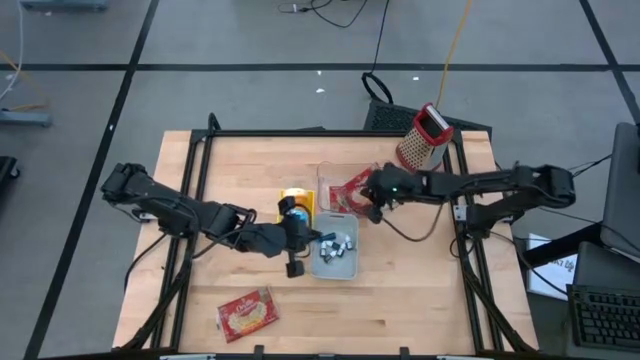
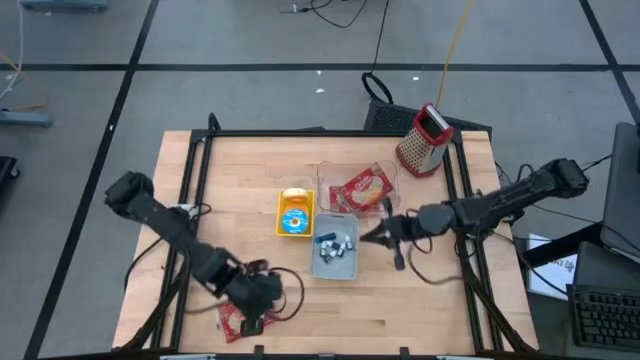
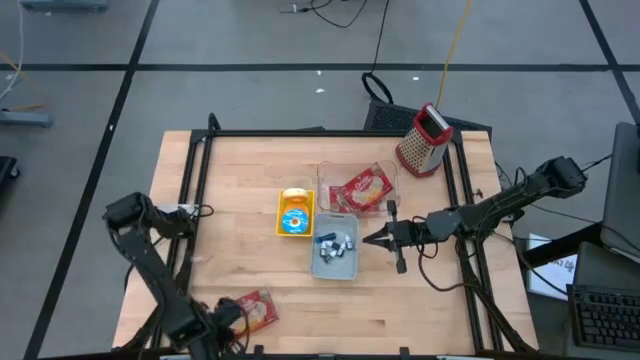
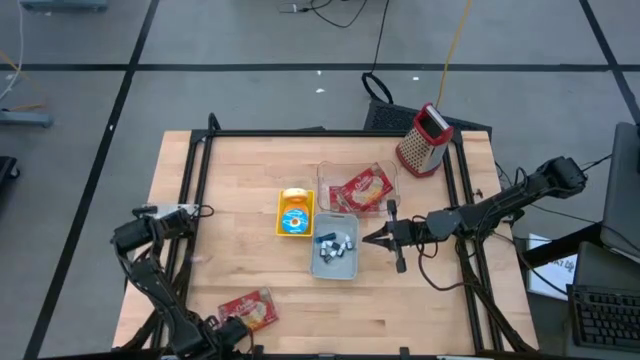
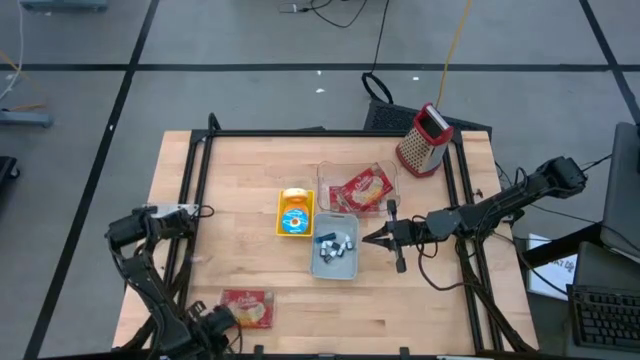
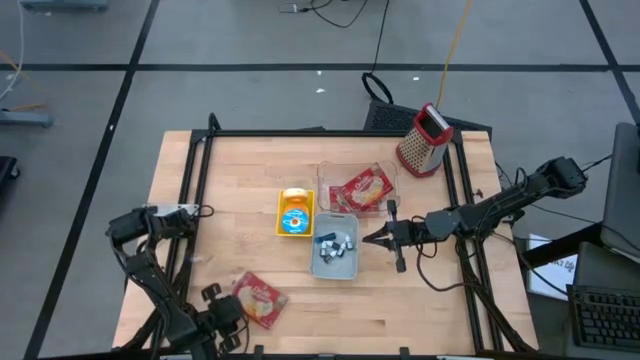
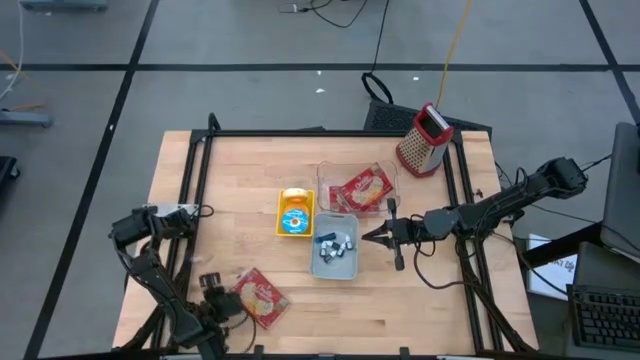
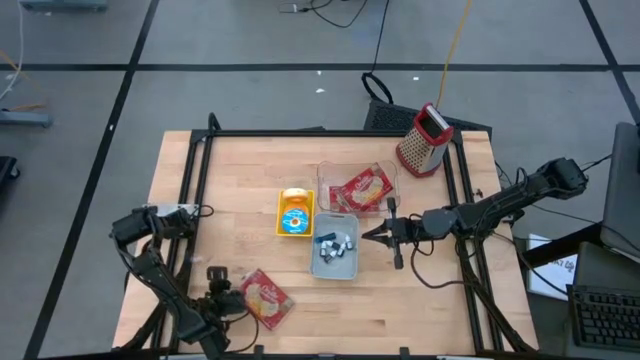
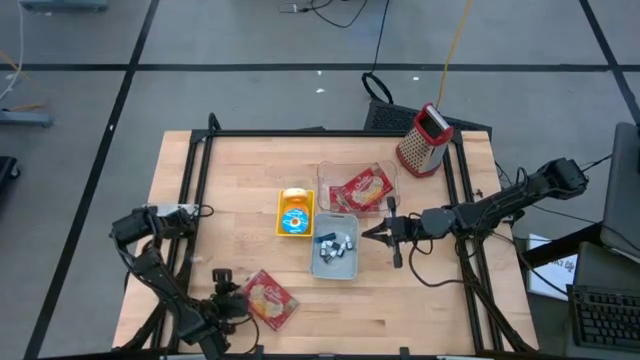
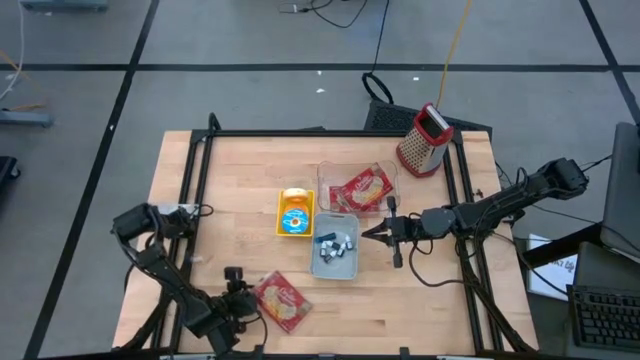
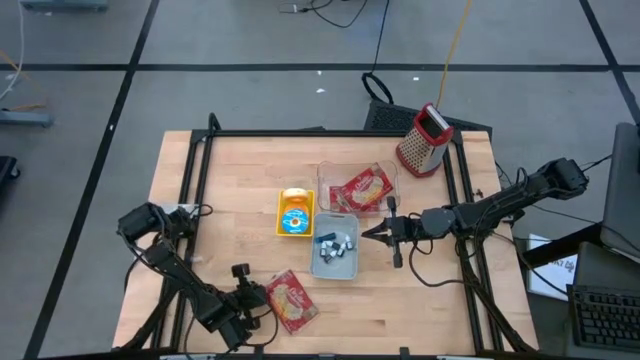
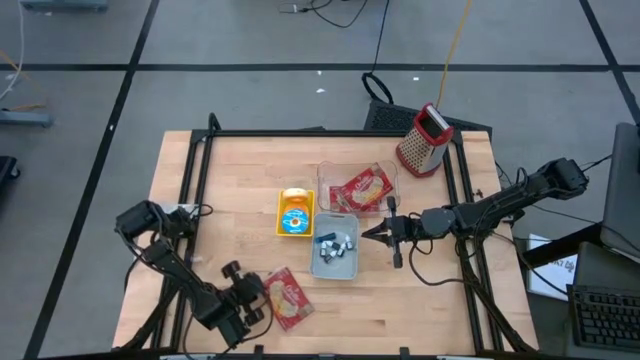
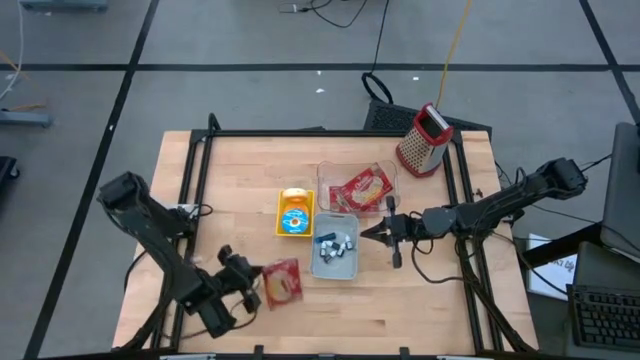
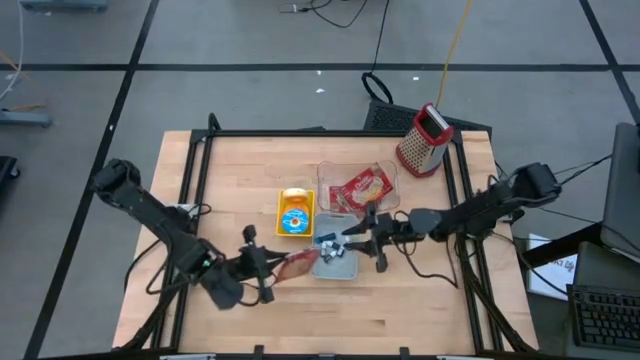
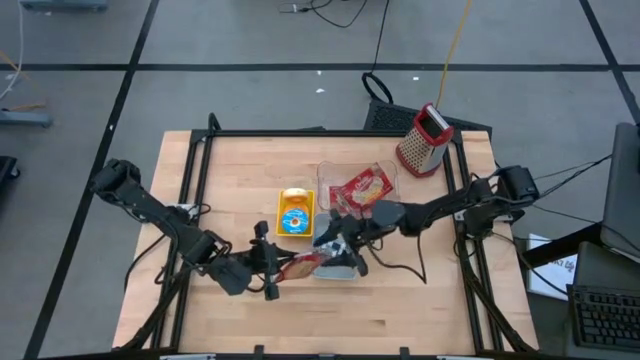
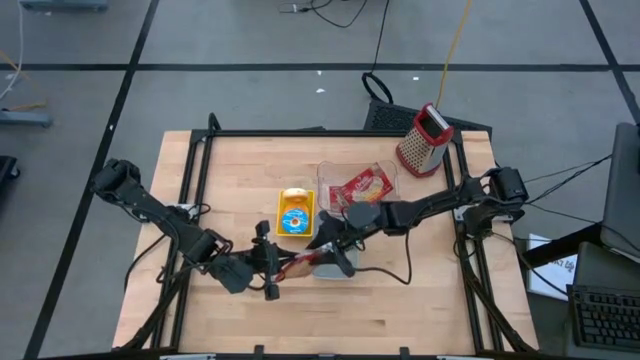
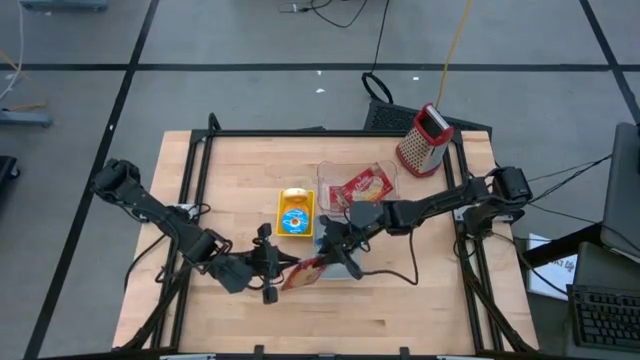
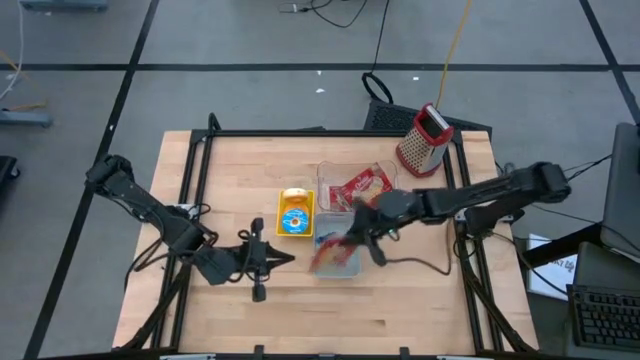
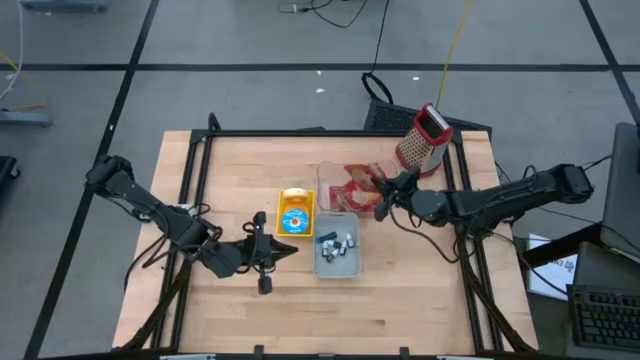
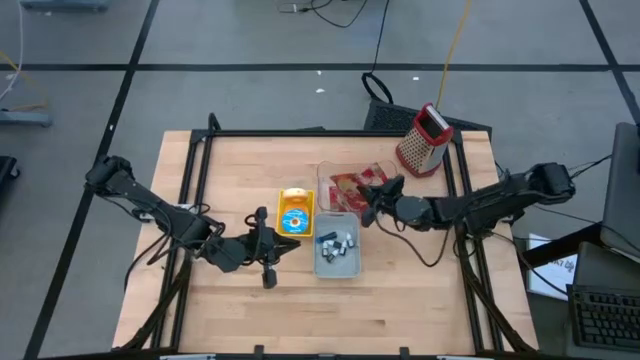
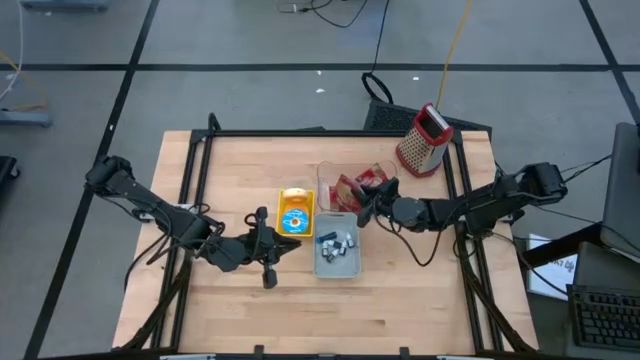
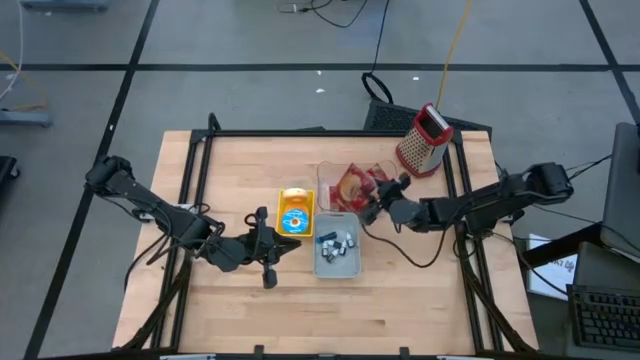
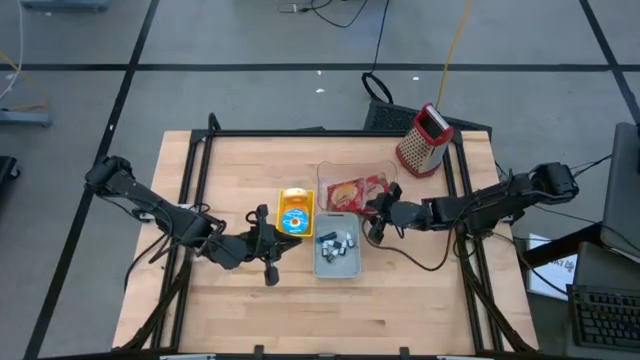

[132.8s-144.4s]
Put the red popcorn bag into the transparent bin

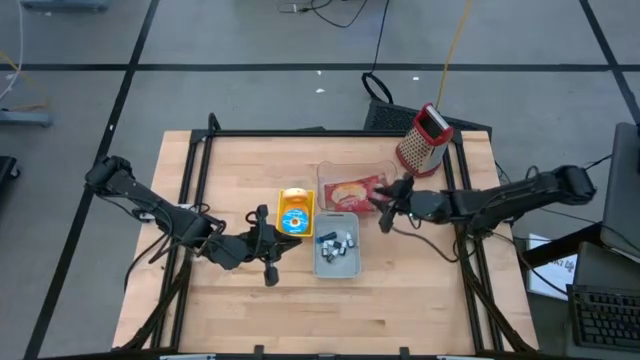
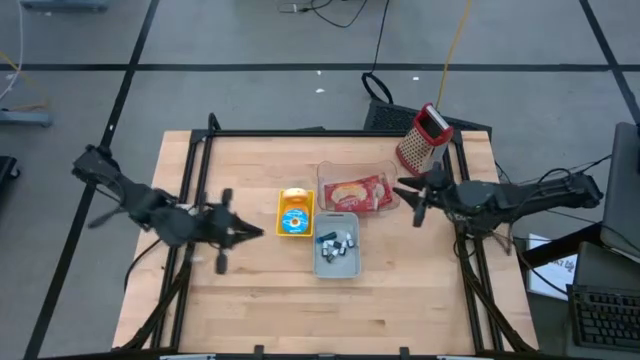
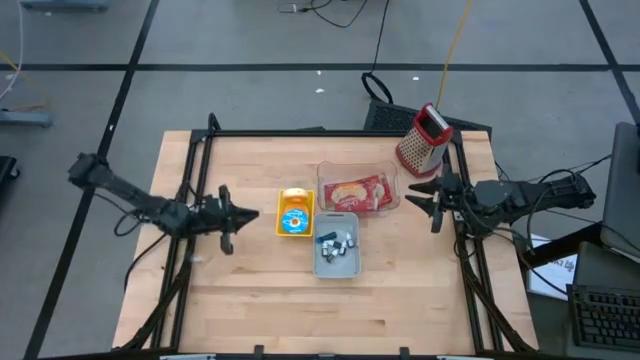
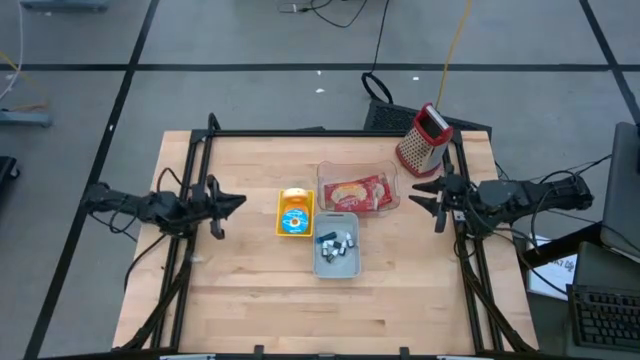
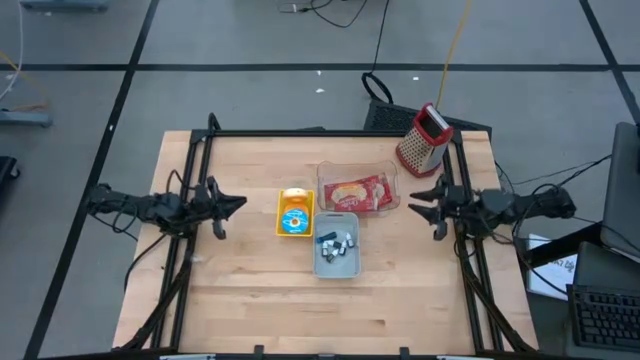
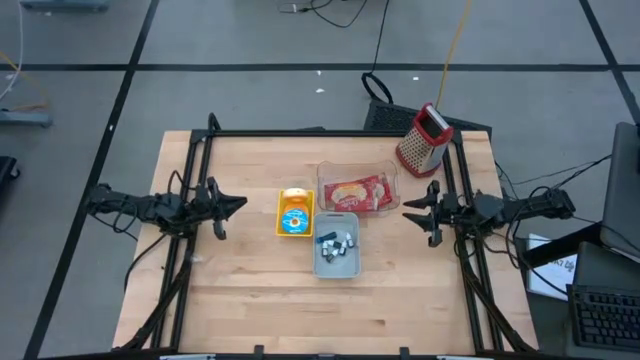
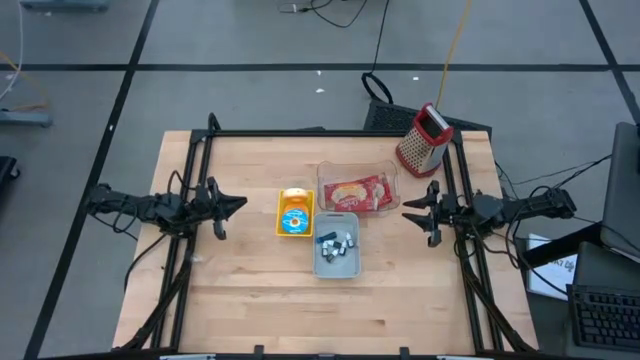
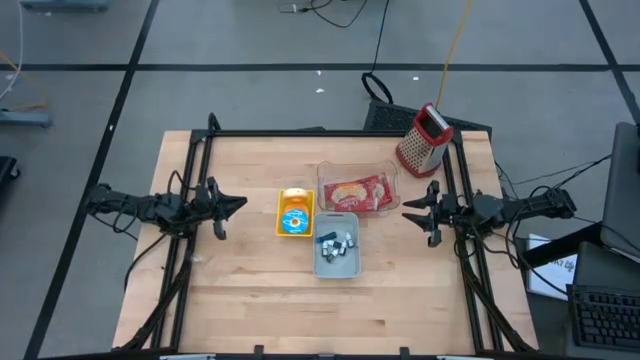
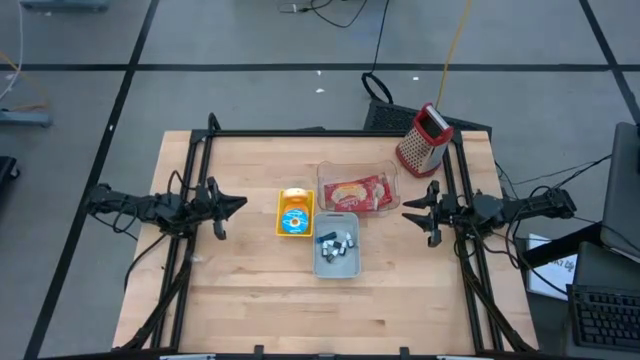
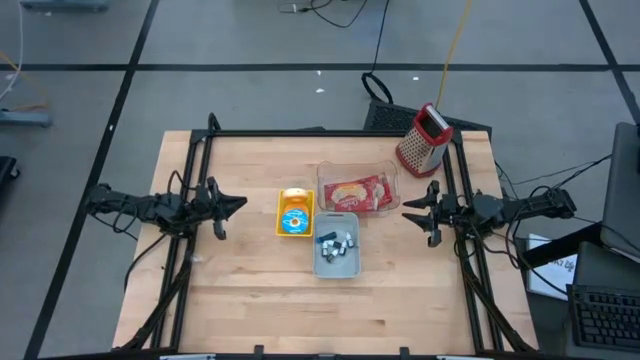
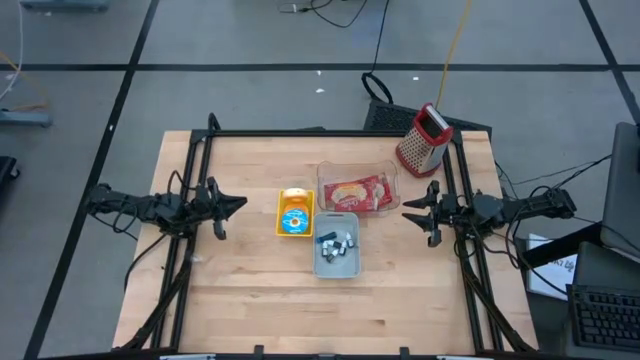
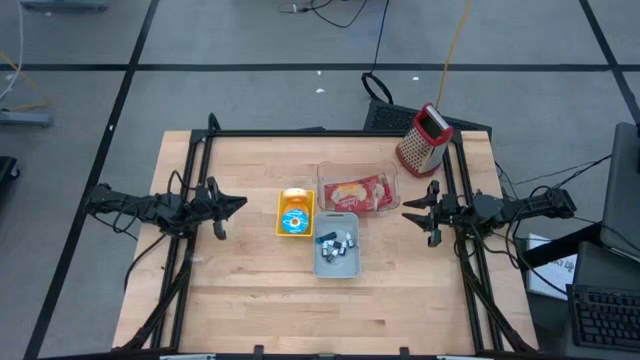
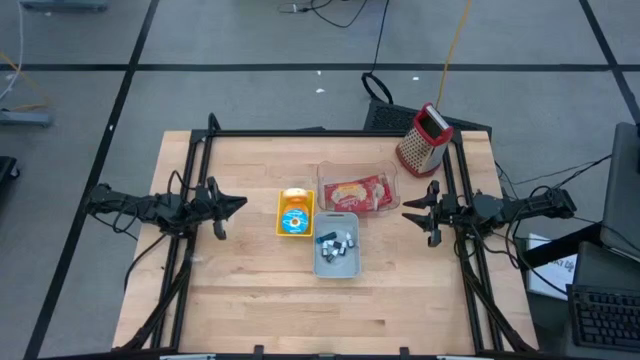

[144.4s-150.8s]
Return to Home Position
